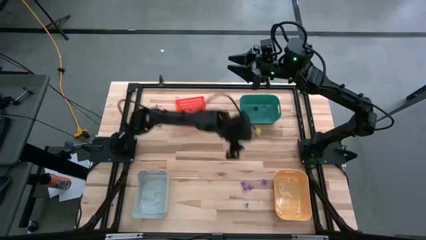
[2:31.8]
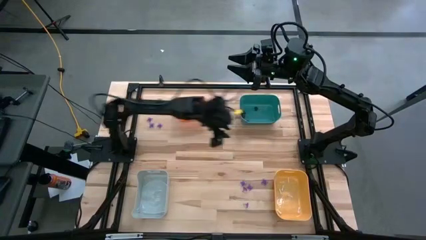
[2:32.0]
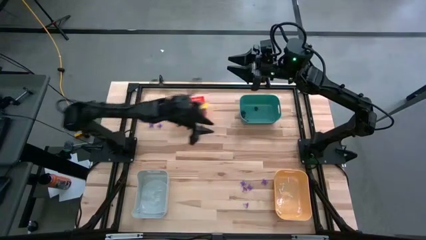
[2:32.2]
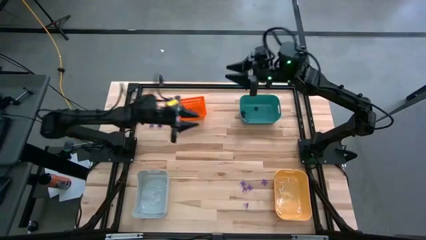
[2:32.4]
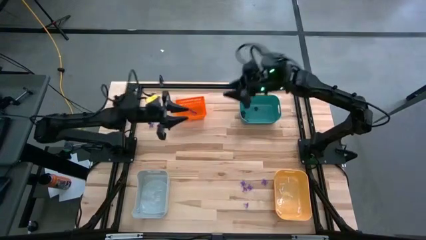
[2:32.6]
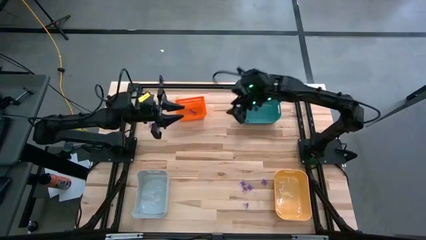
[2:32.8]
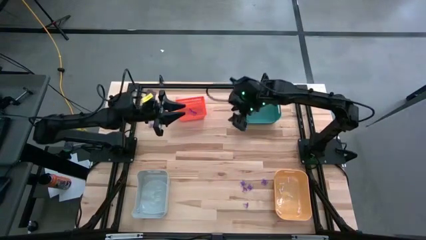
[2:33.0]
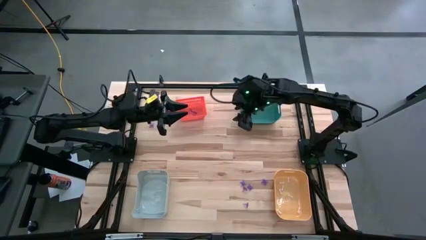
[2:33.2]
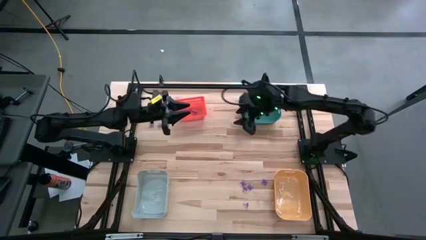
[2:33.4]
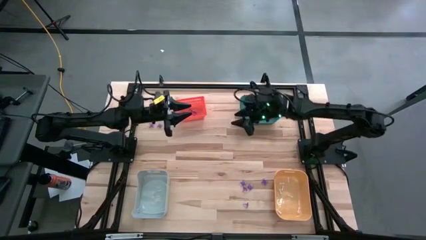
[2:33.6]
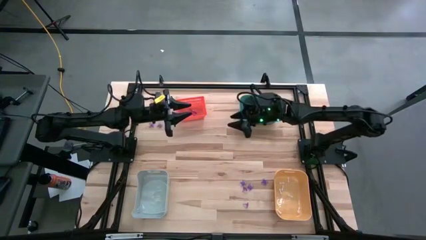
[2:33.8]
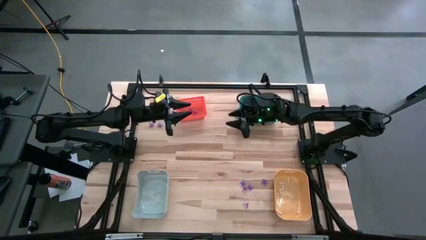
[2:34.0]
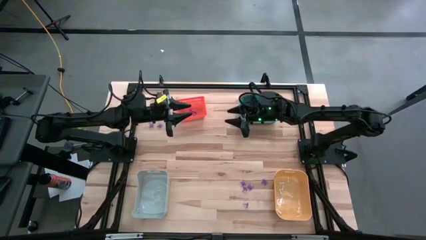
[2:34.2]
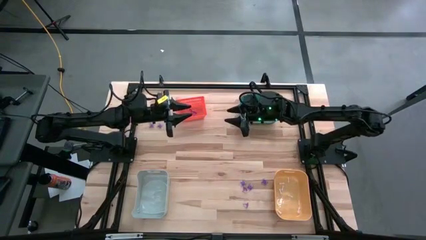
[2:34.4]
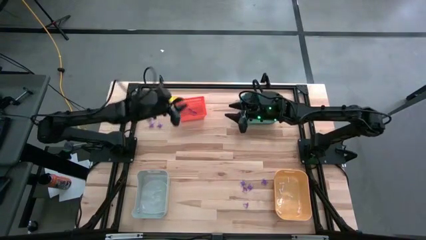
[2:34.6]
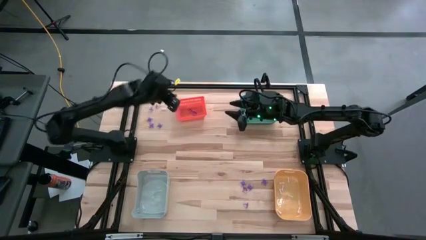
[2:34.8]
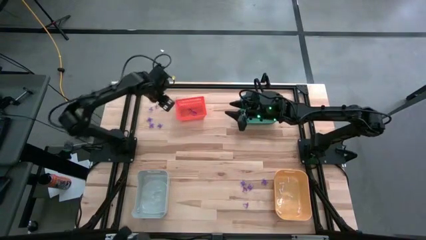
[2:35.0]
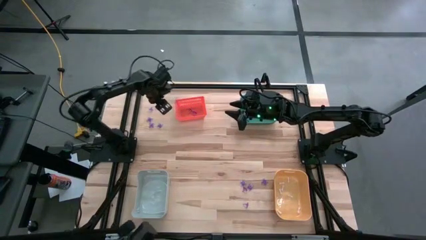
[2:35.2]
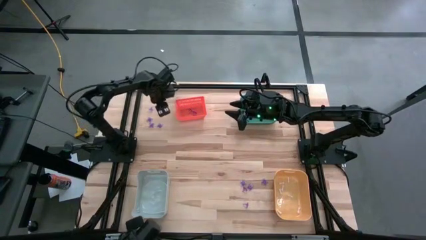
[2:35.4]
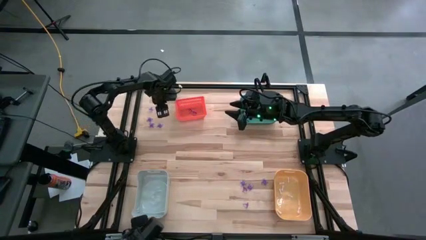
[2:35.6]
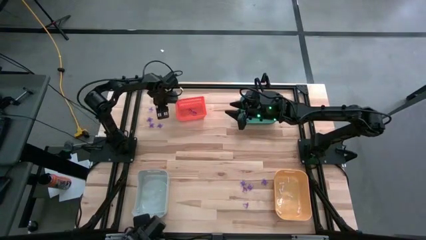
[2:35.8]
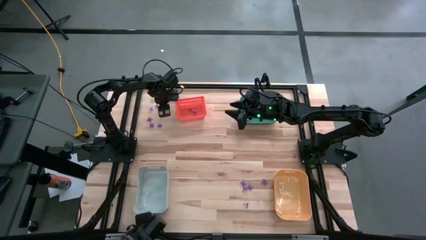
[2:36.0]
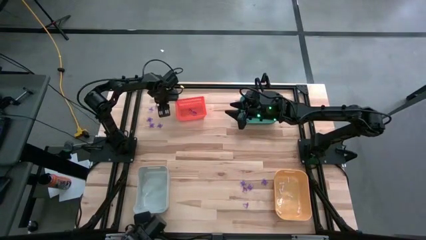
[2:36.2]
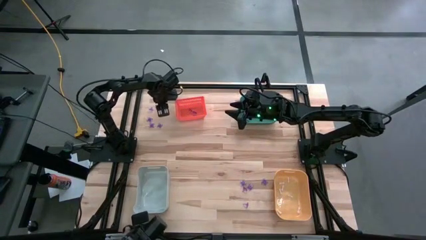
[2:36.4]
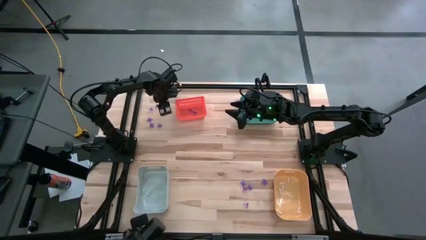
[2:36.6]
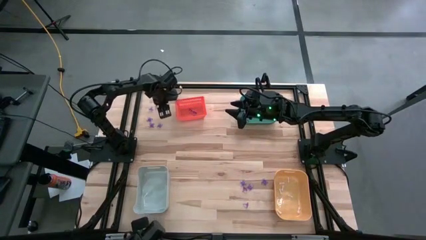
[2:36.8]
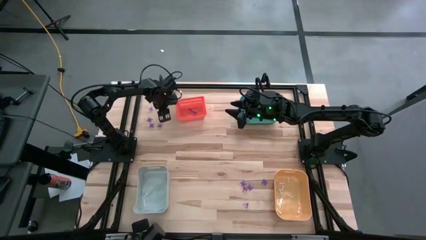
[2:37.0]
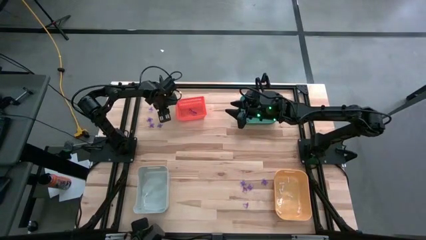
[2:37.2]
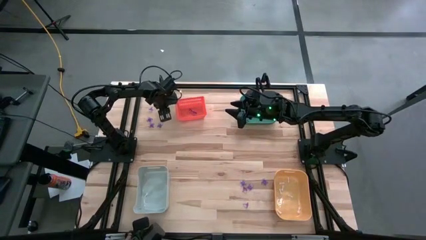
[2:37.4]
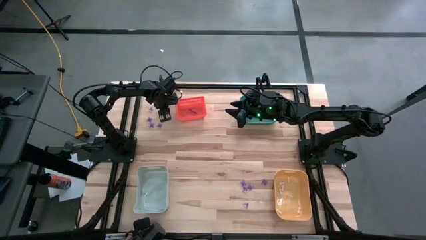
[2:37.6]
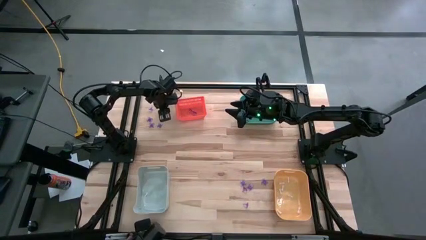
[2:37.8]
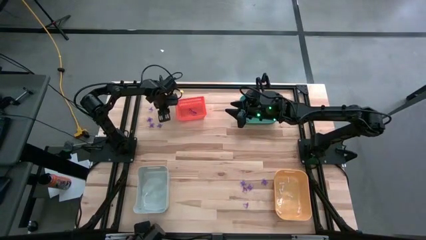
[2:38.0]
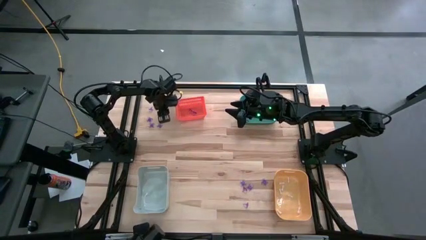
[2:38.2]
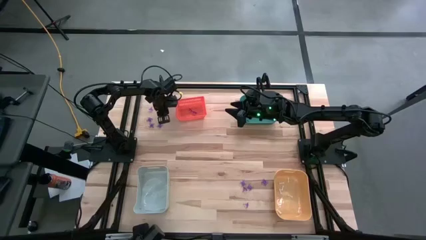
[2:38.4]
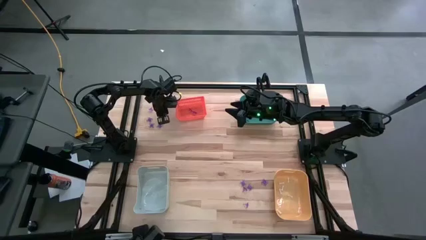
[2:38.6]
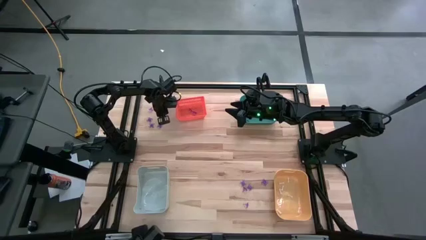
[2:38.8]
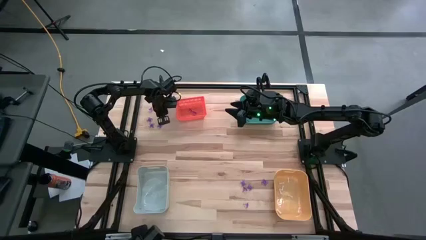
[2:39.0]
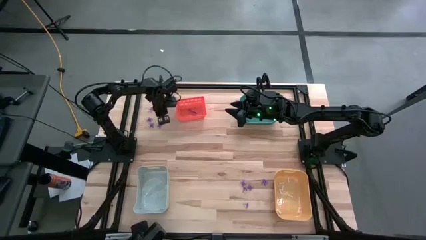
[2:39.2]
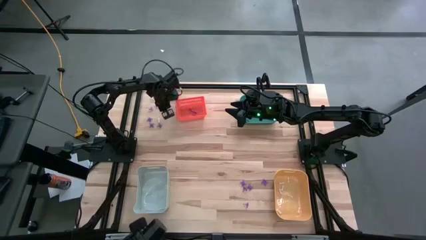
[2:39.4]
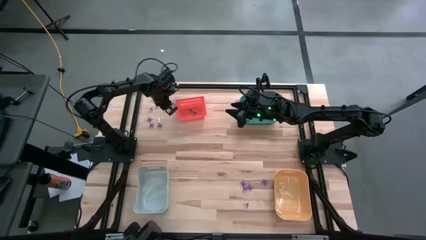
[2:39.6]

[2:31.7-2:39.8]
Task: Sort Halloween decoration
Put the white bone toy into the yellow bin

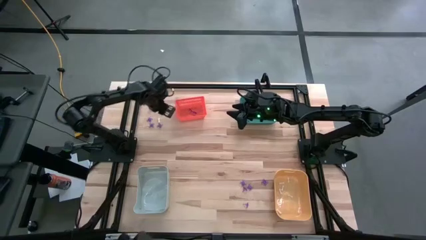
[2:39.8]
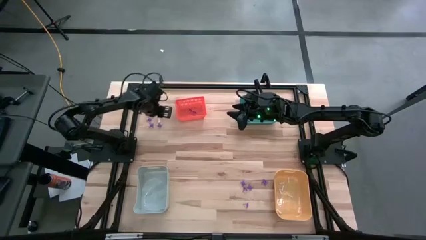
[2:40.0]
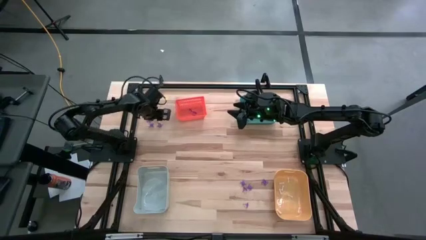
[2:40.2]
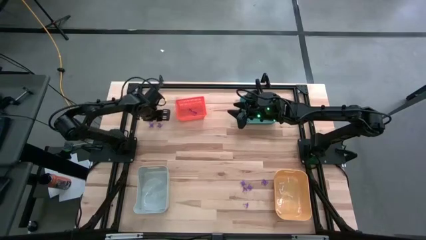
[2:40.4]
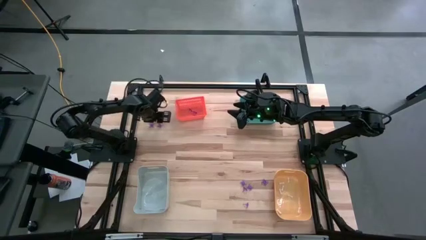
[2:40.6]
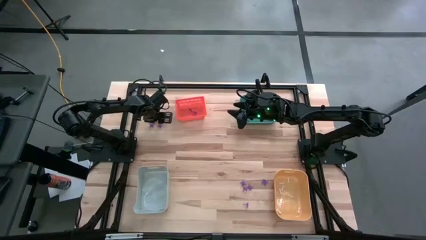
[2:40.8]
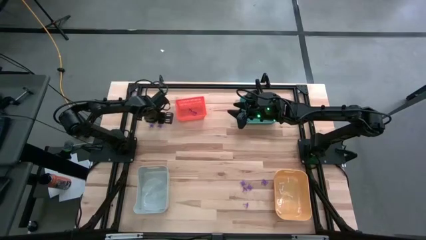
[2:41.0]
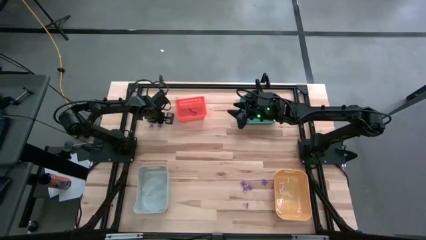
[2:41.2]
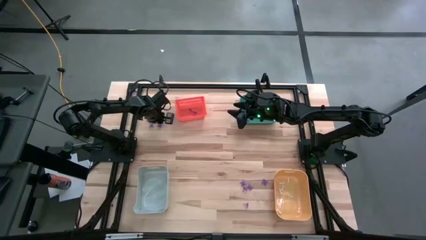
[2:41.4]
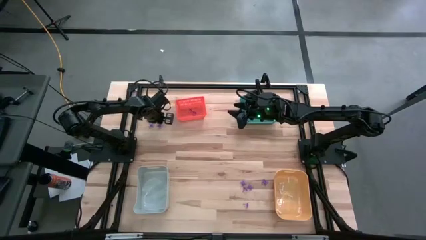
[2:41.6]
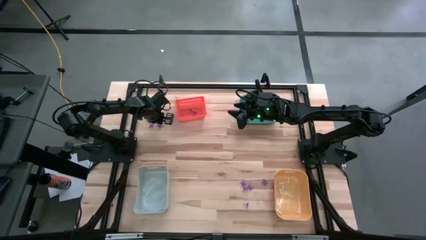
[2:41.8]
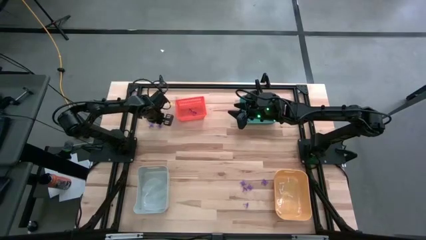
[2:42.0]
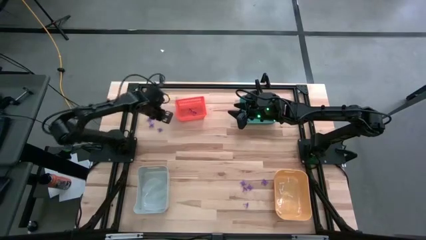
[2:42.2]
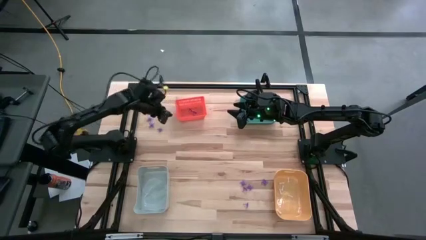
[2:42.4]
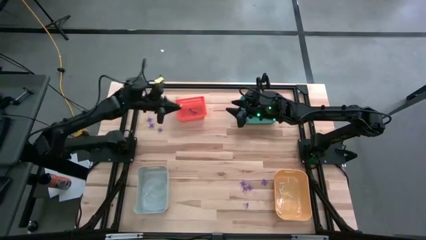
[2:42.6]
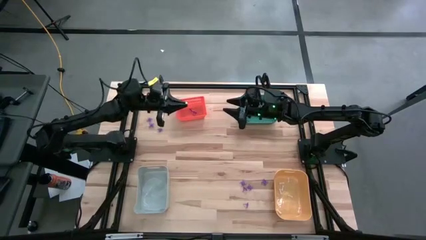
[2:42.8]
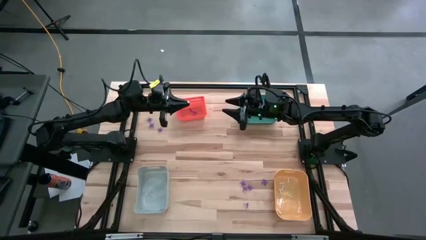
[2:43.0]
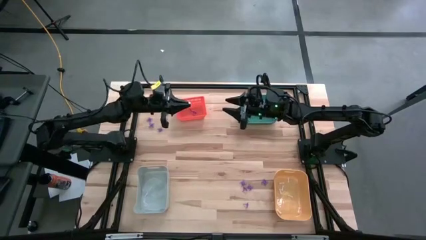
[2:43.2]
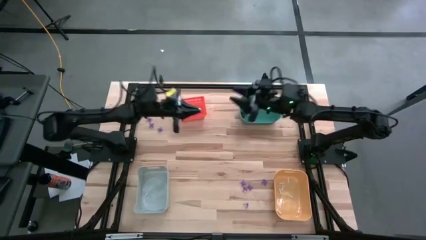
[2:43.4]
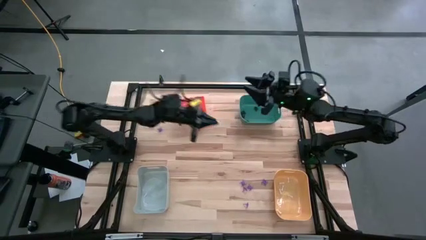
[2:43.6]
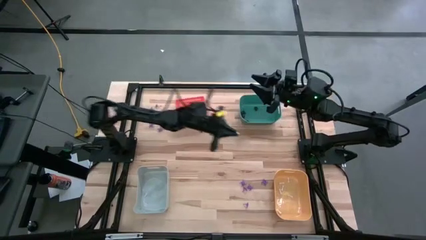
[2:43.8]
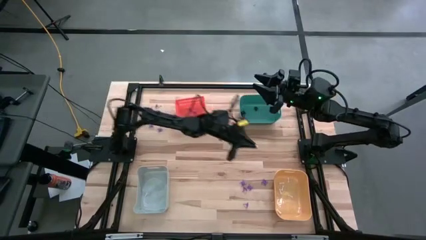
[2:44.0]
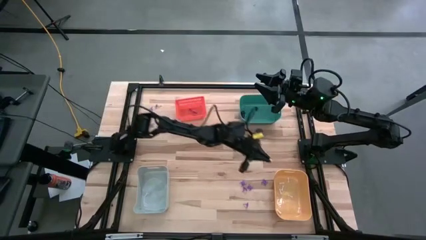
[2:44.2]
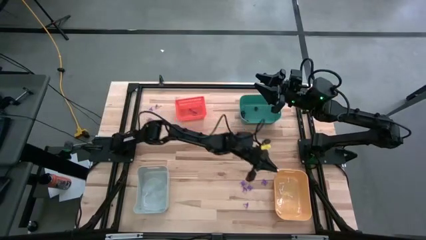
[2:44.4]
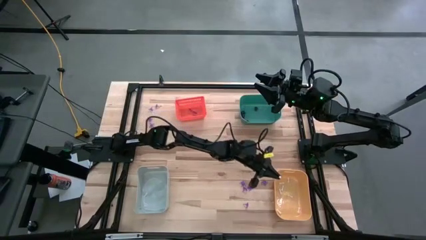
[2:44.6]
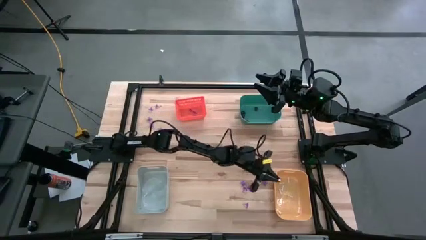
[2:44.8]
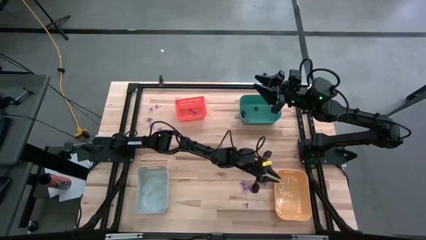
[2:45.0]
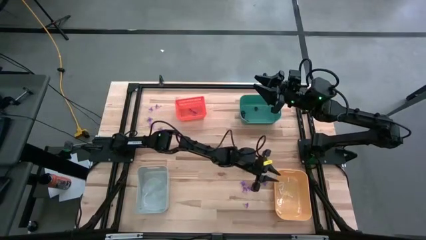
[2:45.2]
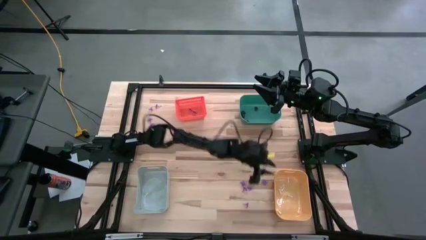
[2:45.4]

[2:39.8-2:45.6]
Put the white bone toy into the yellow bin

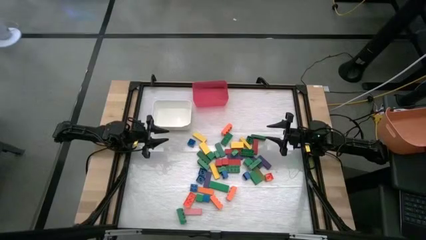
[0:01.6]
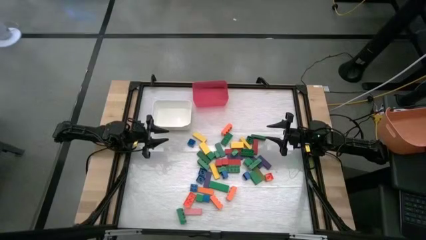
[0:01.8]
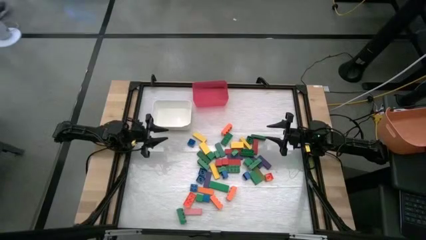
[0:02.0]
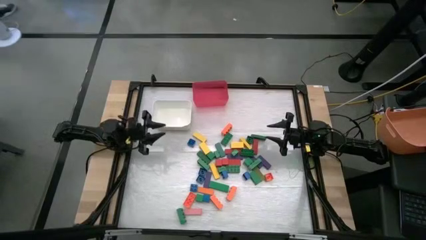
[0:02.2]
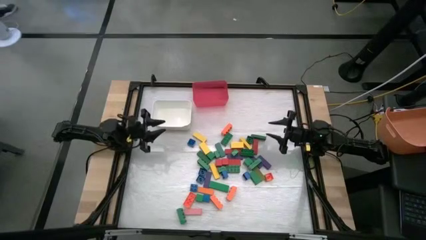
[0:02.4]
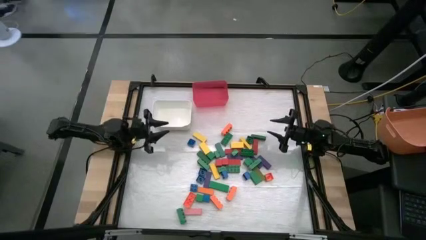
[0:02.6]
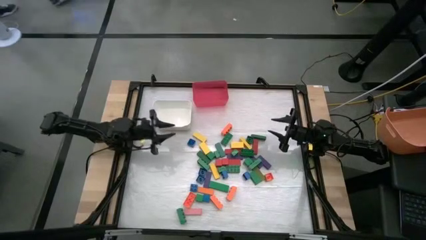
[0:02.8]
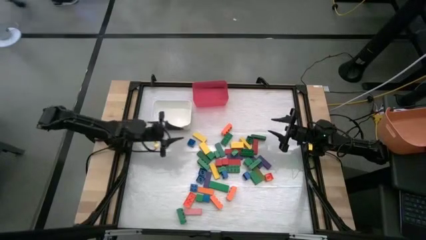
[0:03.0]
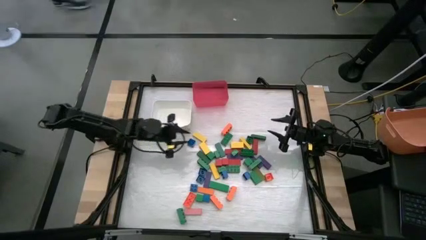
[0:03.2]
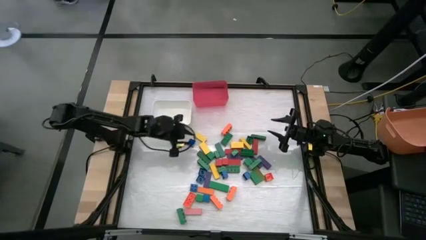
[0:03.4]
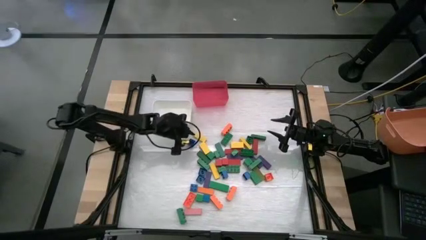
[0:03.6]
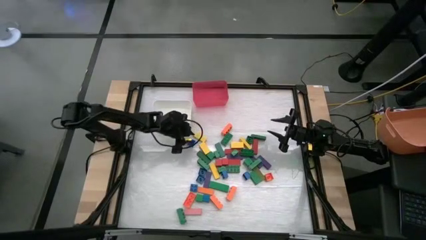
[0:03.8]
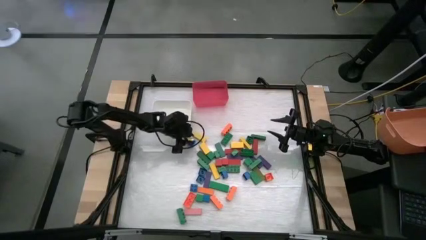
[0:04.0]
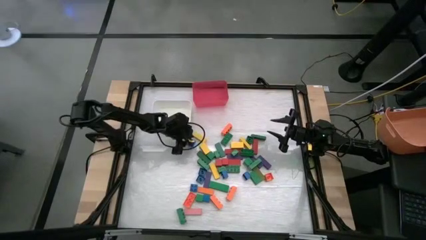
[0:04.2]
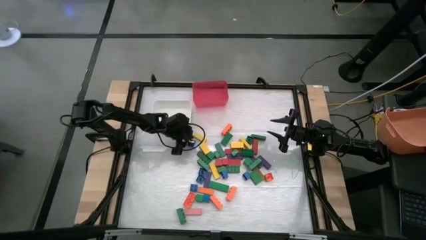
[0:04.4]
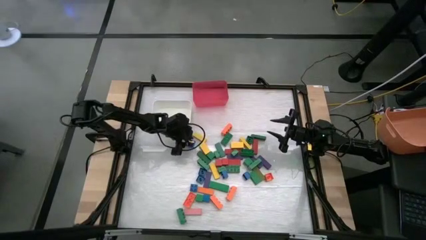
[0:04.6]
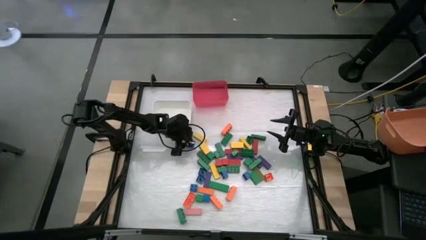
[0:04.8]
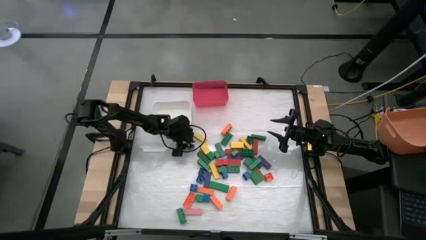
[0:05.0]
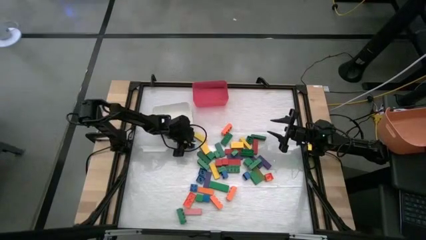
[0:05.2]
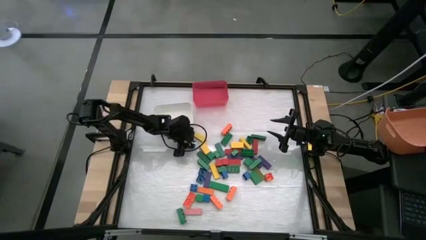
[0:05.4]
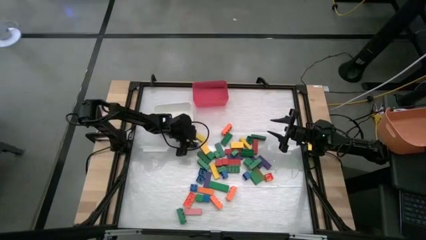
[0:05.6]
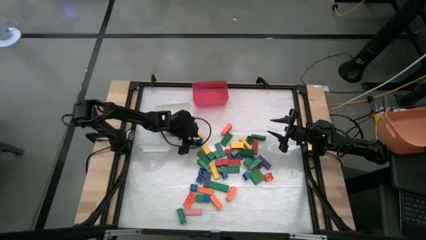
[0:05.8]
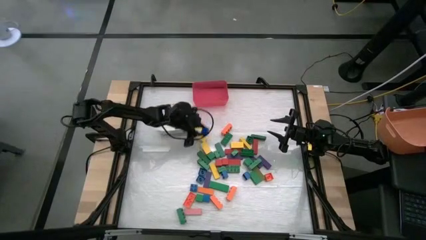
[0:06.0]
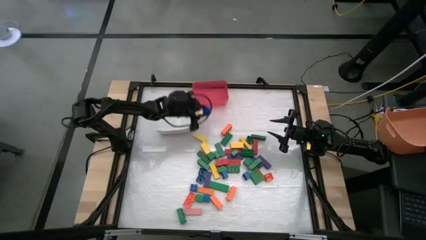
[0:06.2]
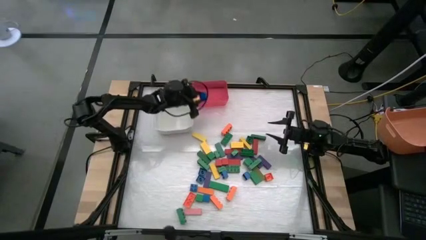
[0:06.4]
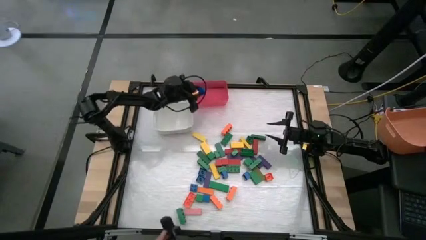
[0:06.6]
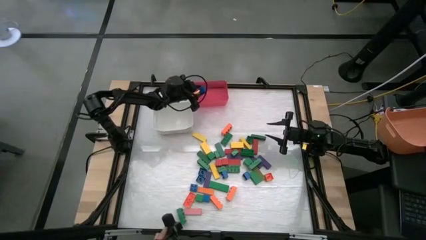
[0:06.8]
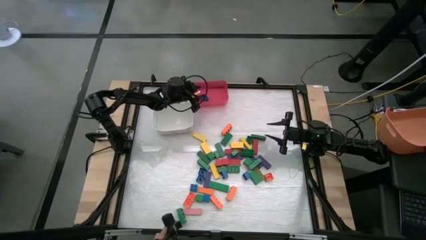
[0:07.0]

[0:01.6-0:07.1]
Task: Sort blocks by size
Put the small blue game piece into the red bin
